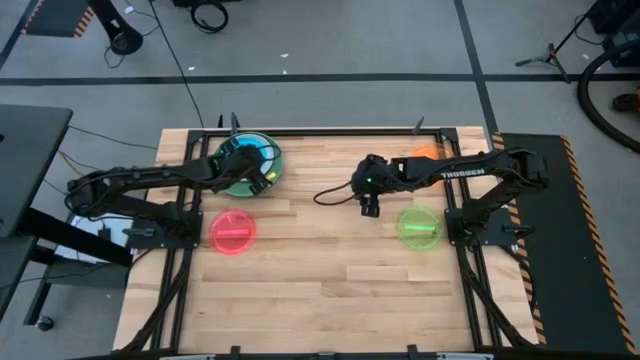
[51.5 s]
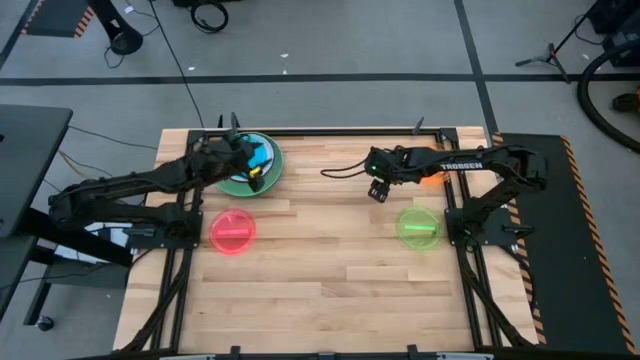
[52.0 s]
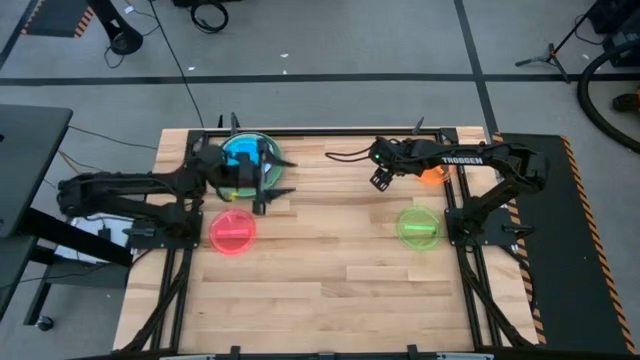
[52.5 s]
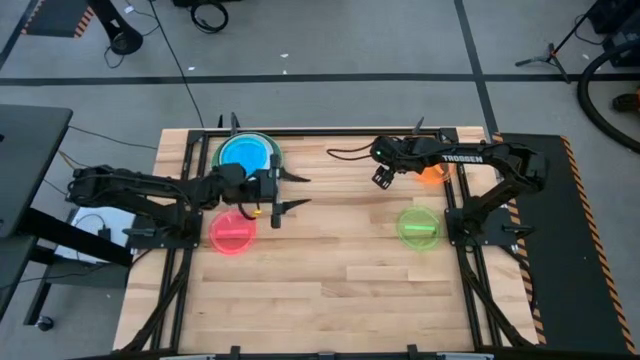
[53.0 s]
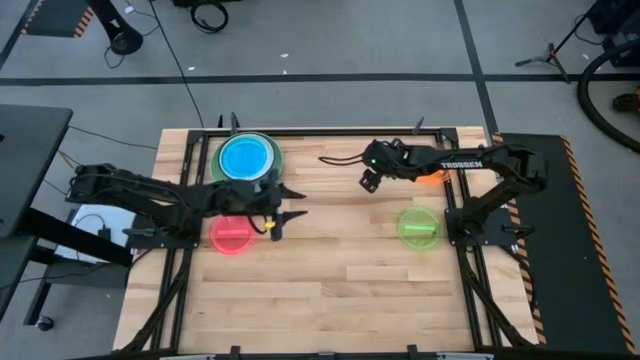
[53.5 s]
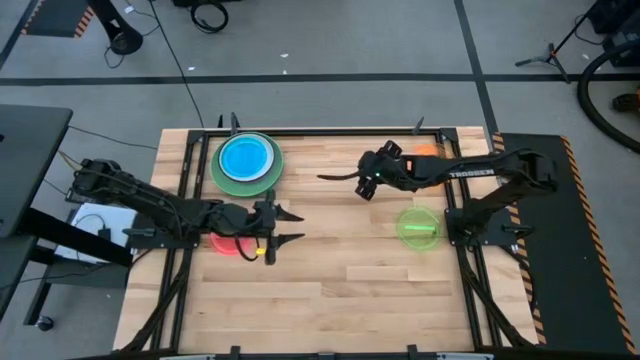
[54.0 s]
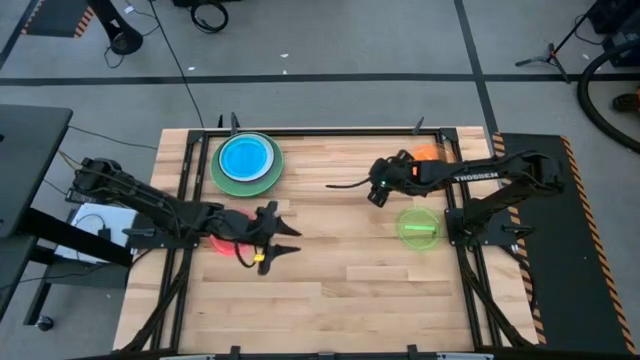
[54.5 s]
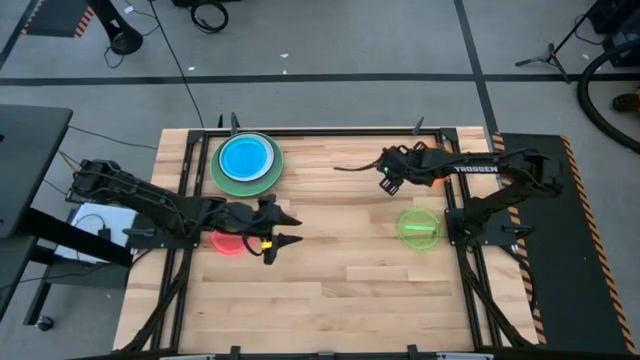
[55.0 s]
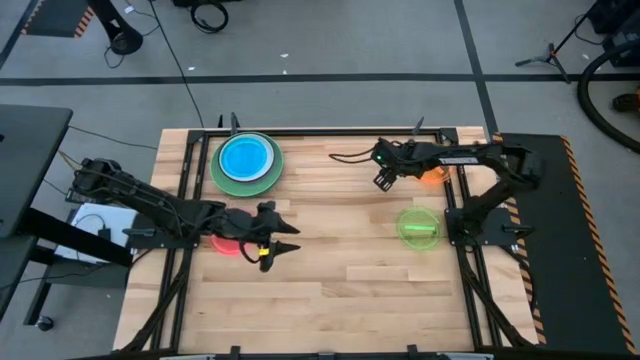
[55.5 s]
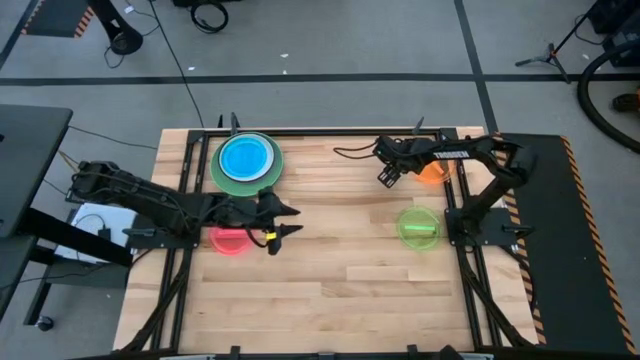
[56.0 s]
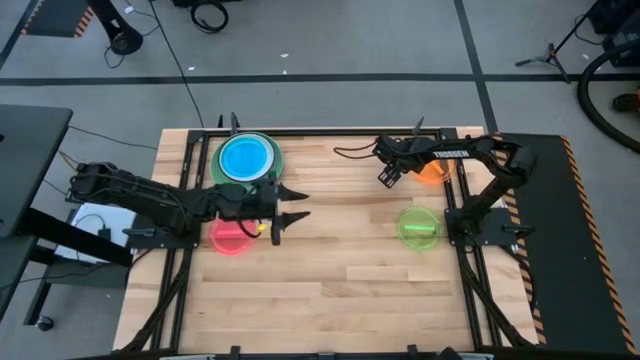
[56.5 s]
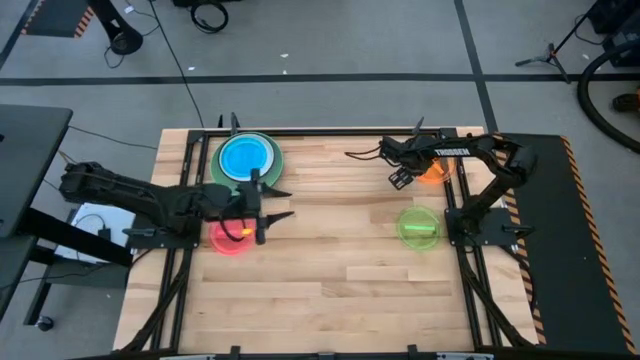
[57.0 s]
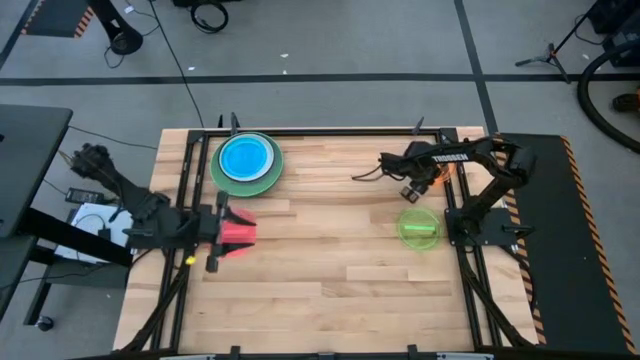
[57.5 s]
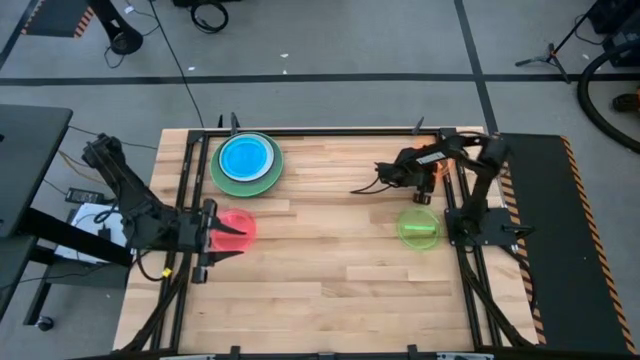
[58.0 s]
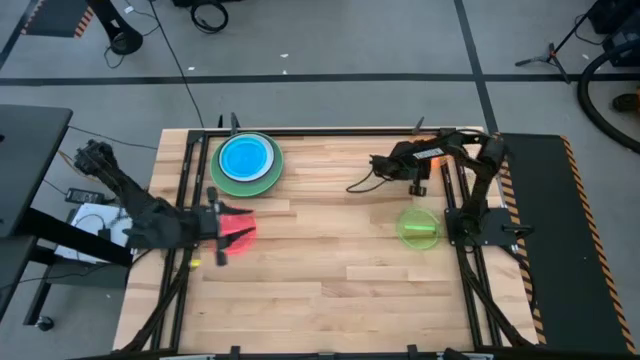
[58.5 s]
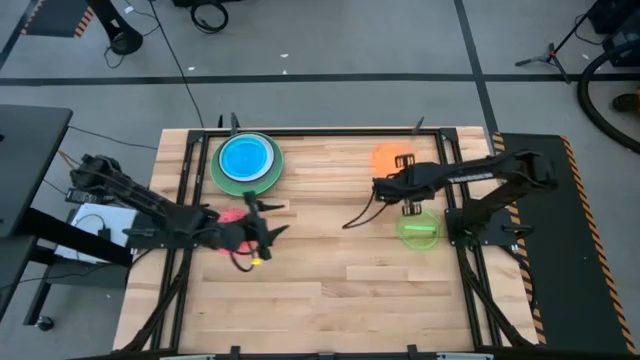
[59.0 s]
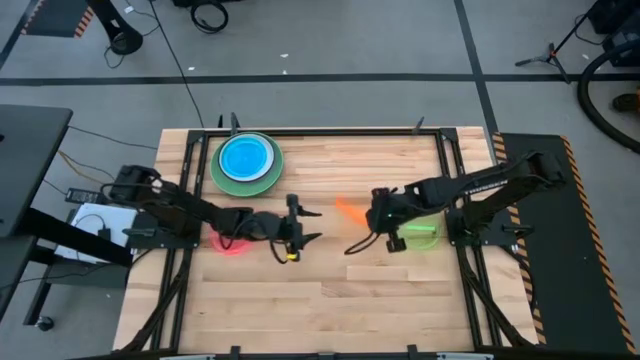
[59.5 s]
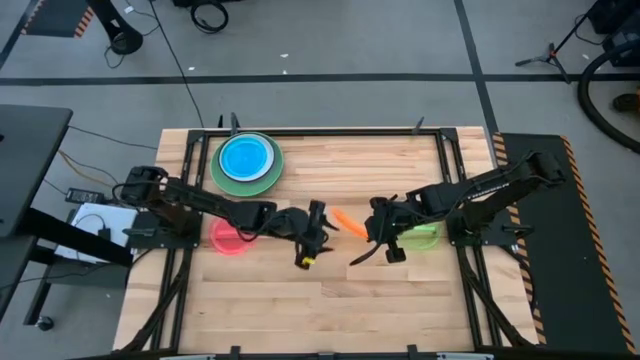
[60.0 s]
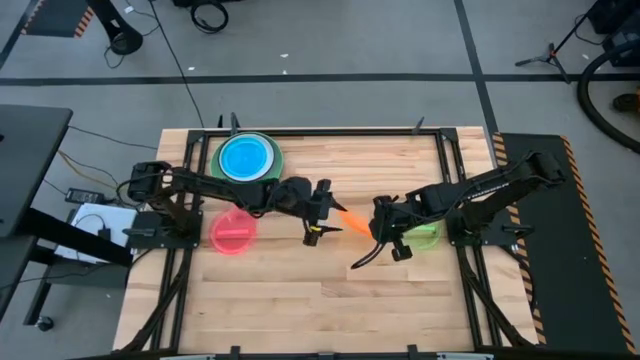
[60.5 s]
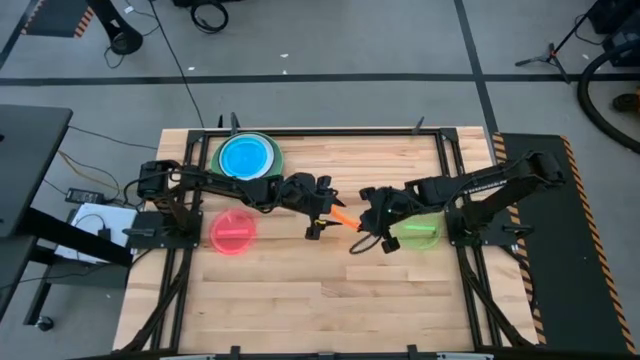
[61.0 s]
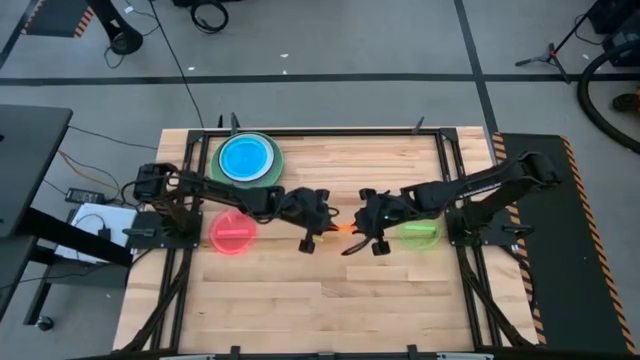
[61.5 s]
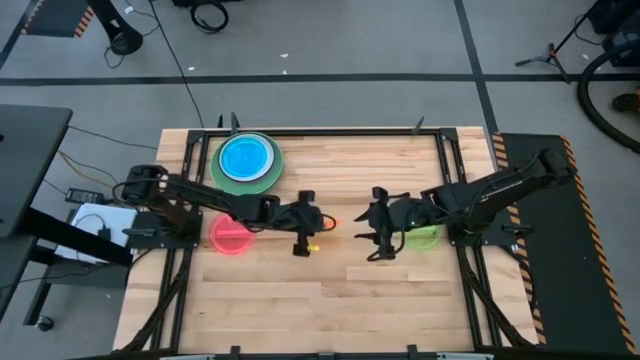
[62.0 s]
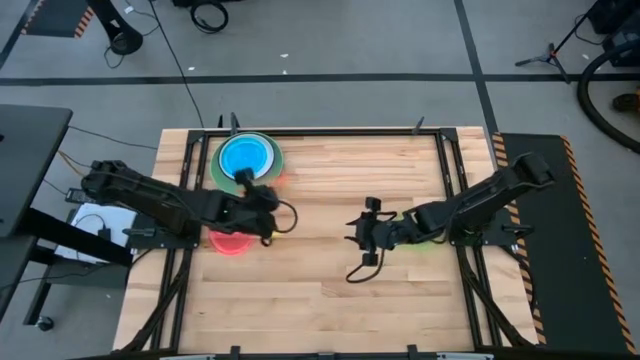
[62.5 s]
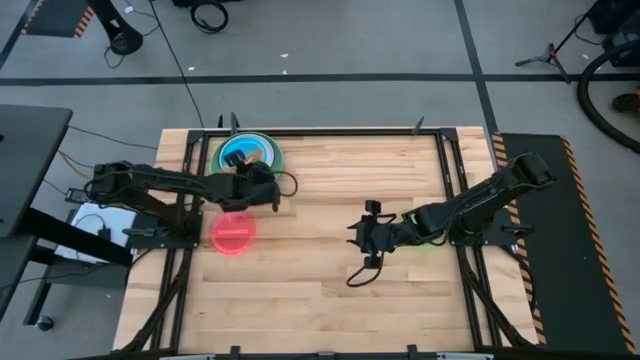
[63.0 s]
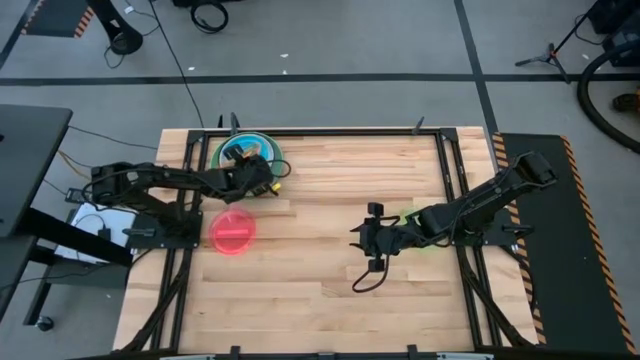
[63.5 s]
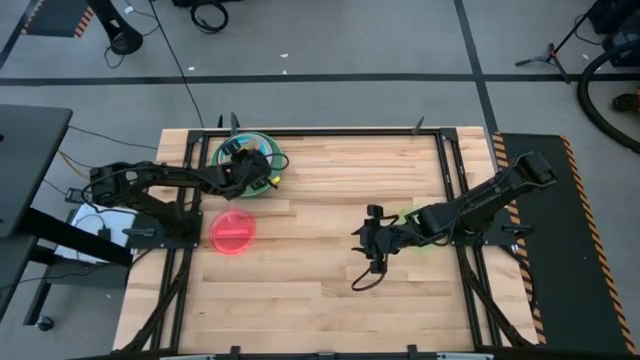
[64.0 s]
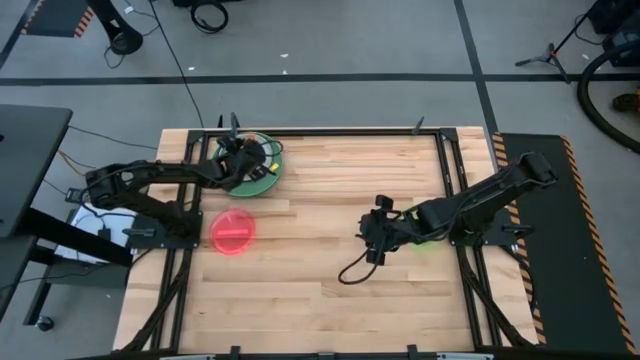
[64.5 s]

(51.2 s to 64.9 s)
Task: Stack plastic plates
Stack the orange plate on top of the blue plate

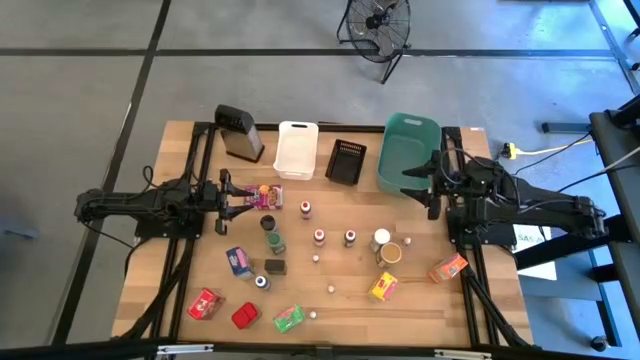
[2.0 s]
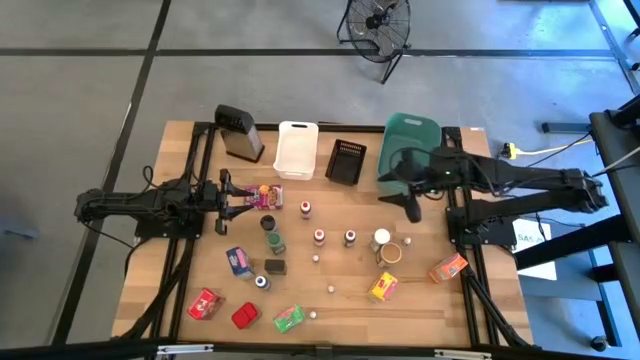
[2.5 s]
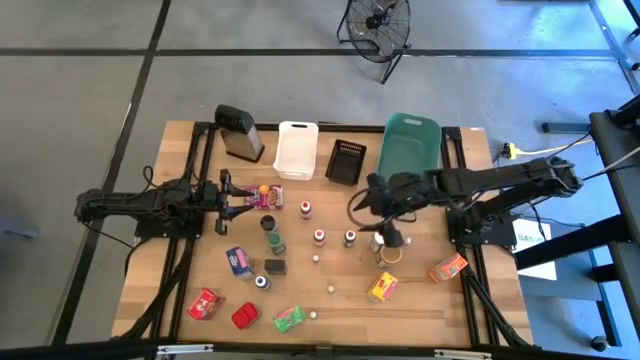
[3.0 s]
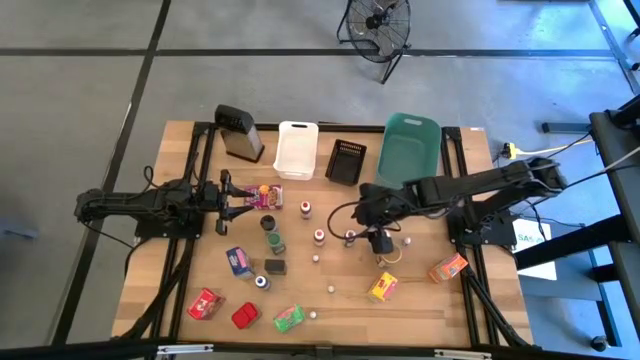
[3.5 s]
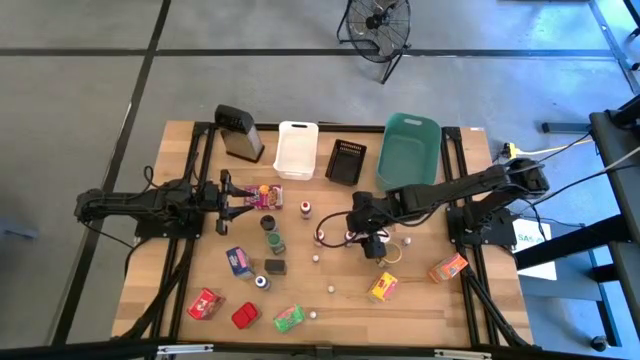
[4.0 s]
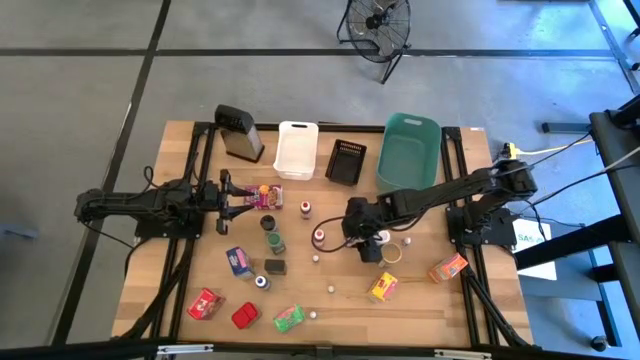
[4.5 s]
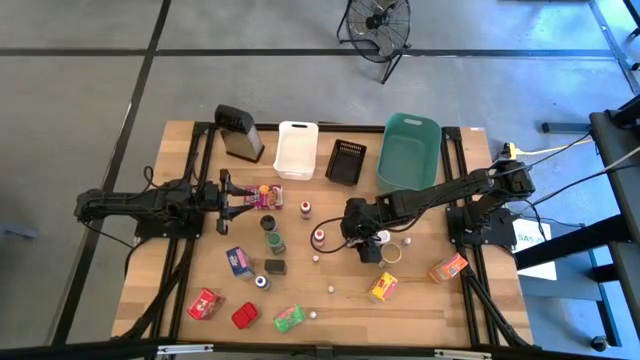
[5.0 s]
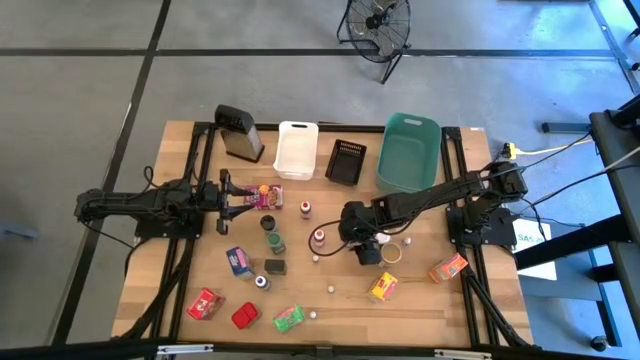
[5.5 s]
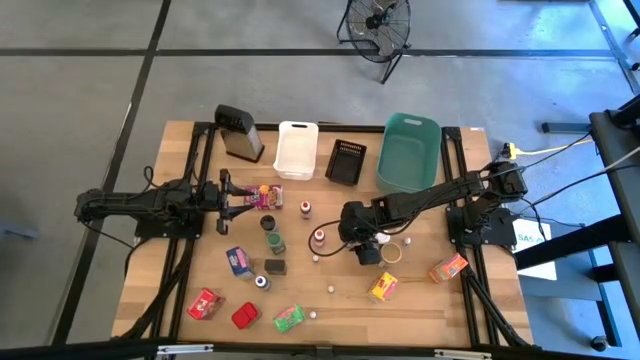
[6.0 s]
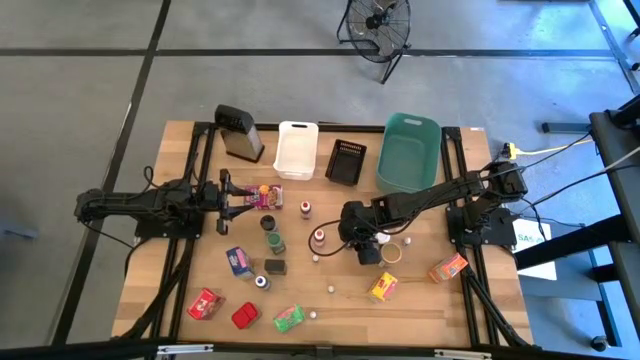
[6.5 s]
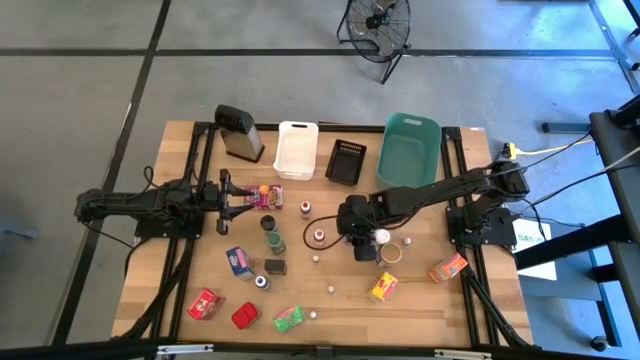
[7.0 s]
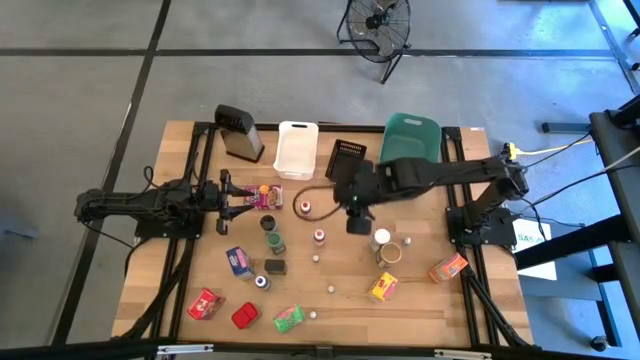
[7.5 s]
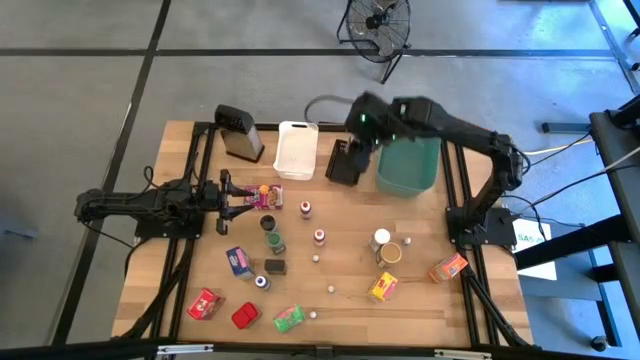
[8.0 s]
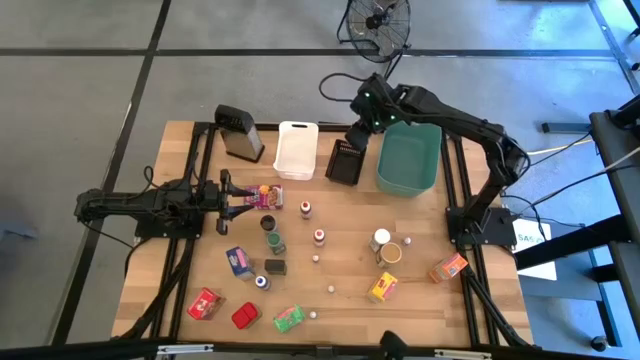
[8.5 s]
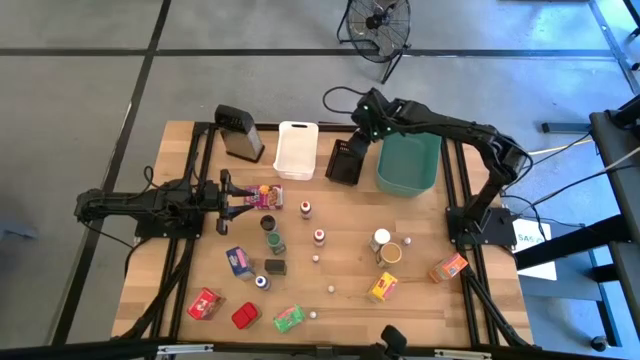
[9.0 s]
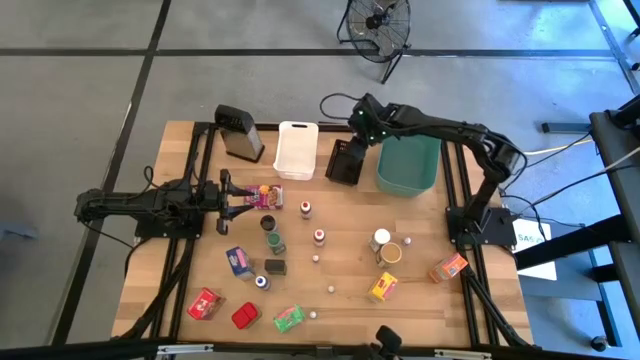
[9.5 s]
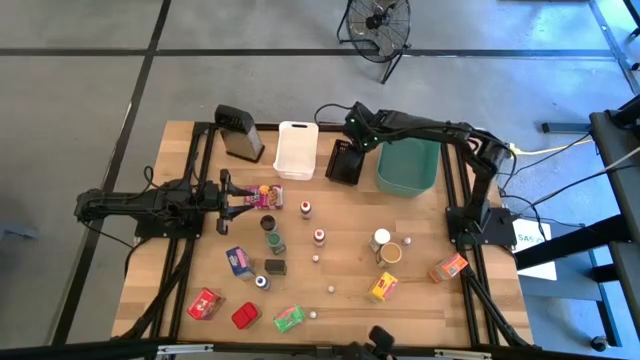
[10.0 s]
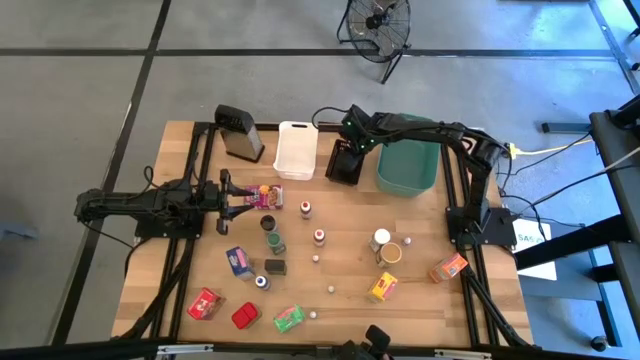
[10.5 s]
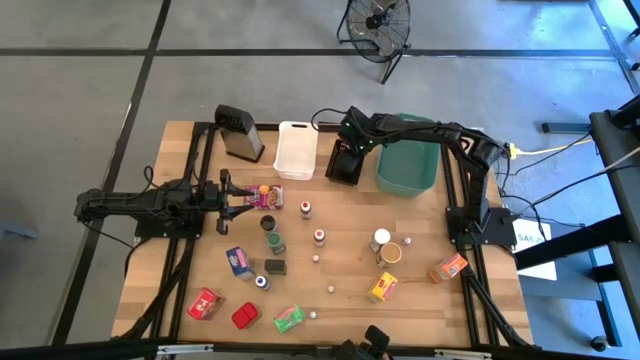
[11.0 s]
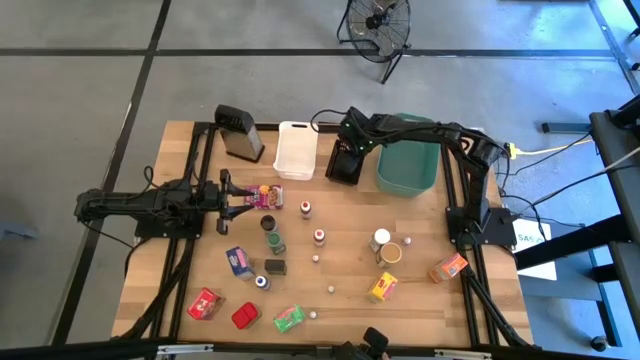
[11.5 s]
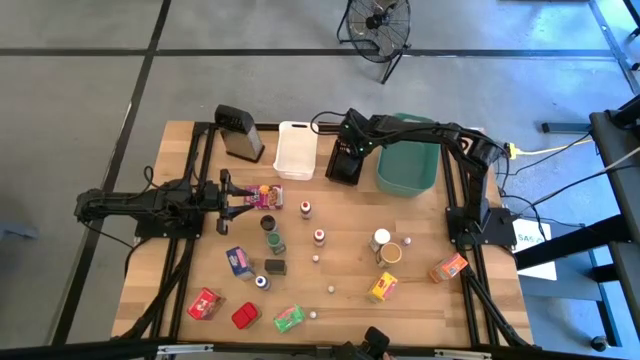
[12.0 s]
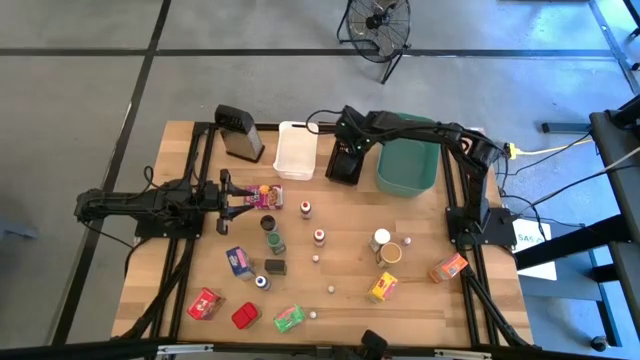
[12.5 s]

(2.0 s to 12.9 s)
Task: Pick & Place Kitchen Items
Put the large purple food coloring bottle into the black bin
